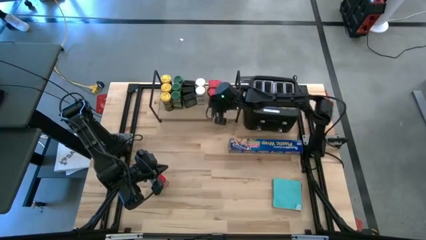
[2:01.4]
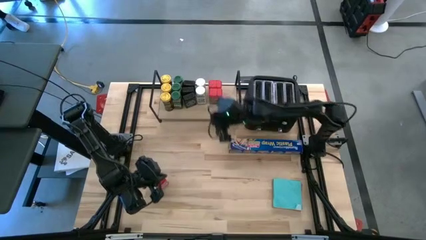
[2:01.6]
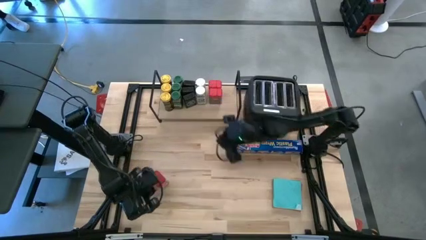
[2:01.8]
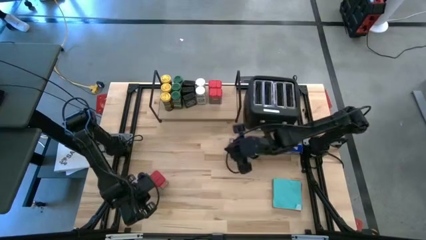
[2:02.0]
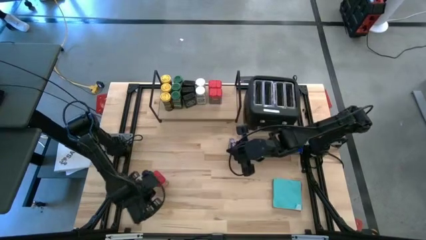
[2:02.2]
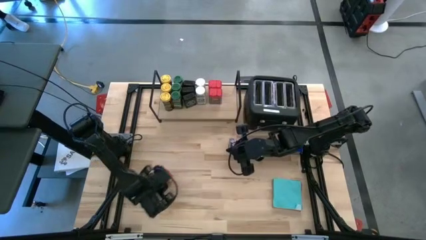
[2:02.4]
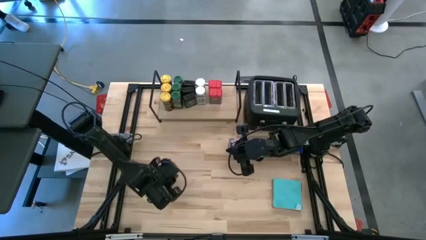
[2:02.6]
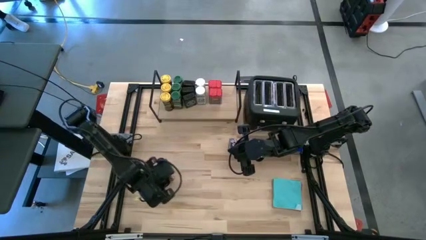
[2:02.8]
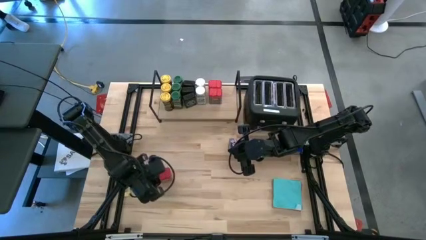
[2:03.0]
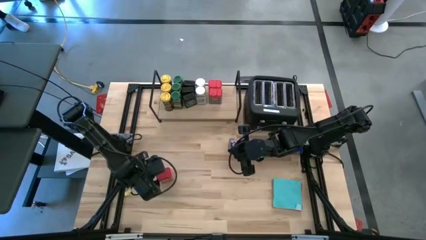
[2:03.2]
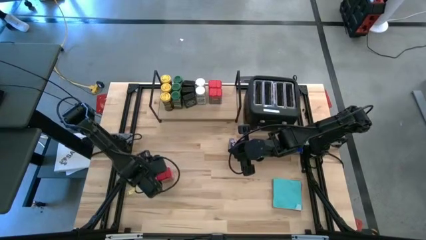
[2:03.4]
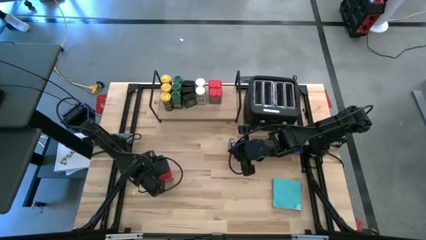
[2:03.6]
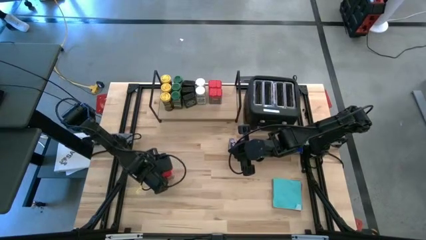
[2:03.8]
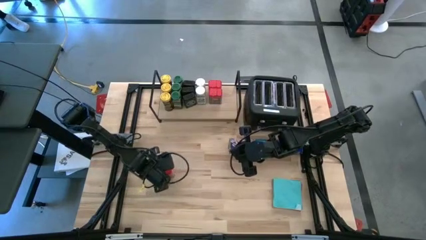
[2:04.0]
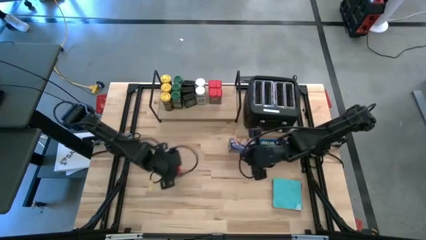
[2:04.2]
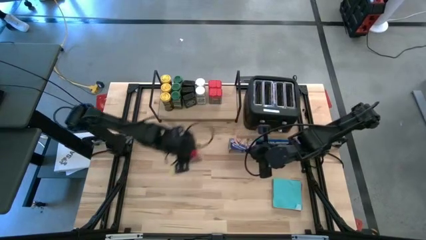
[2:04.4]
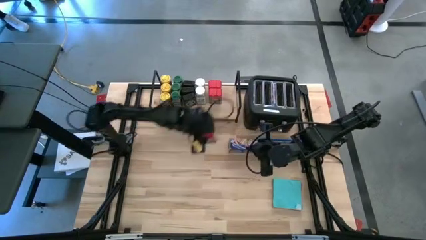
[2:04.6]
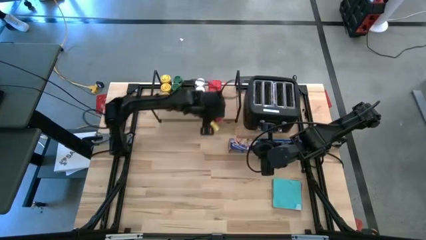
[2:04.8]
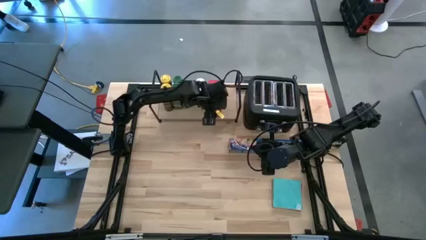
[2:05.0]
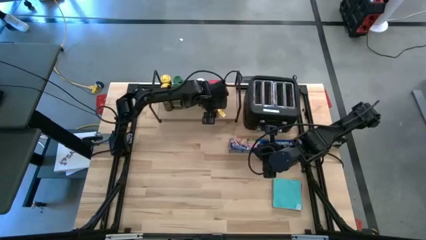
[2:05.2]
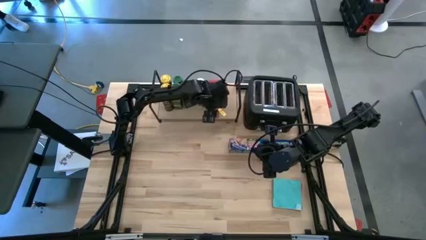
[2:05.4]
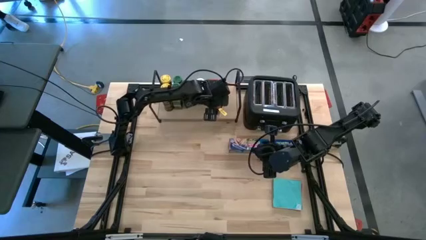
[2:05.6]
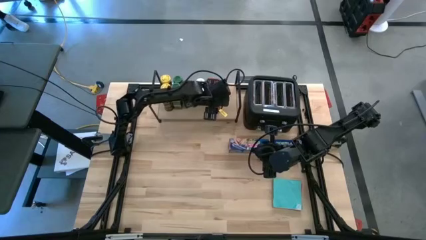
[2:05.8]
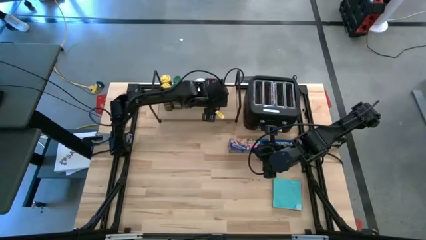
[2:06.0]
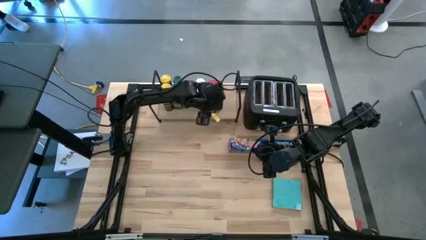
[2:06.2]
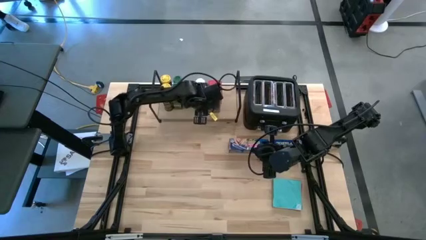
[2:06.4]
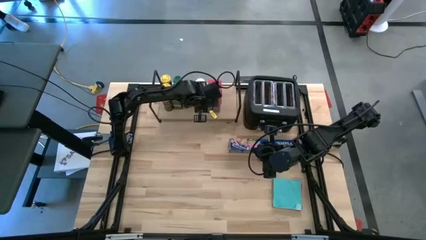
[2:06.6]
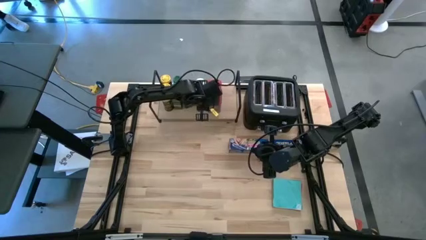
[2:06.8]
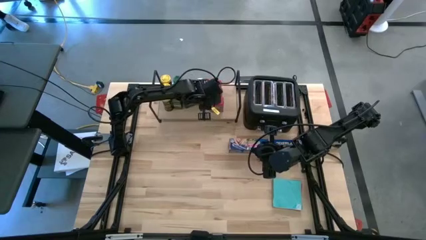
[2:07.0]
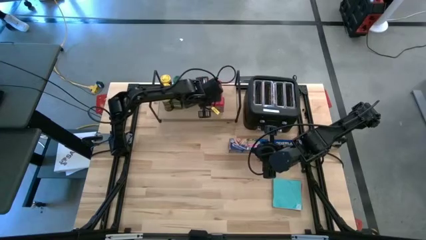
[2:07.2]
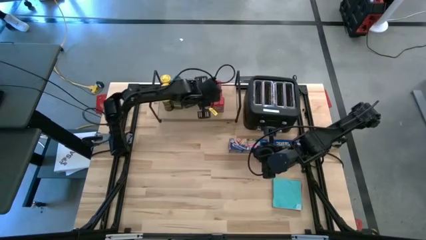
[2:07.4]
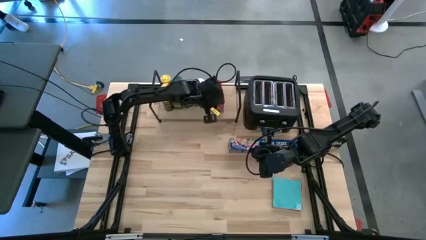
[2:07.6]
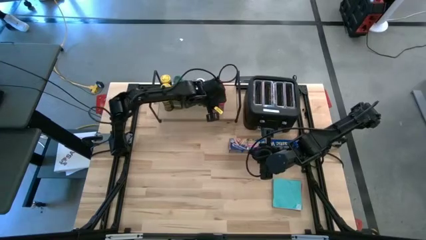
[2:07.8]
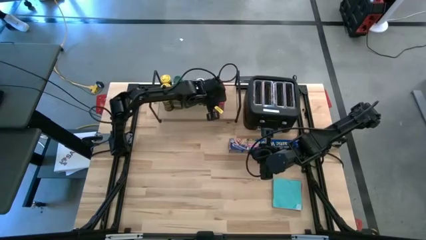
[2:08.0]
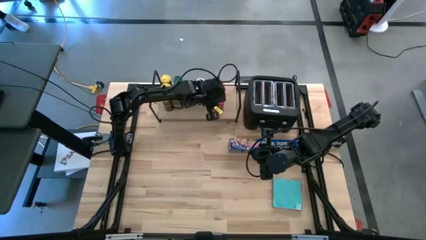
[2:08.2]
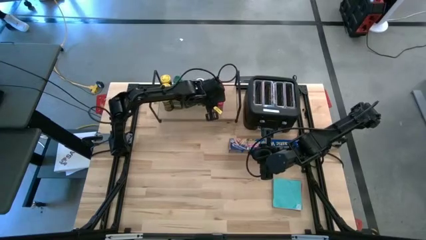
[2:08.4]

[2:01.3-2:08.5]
Task: Shelf spices
Put the red seasoning container on the shelf aligned with the other red seasoning containers

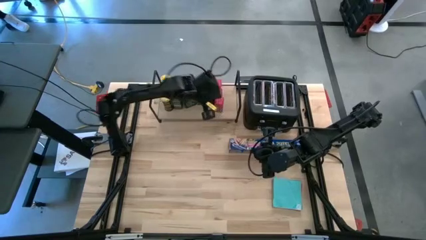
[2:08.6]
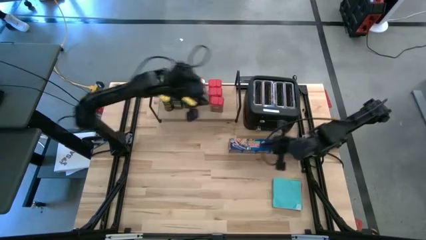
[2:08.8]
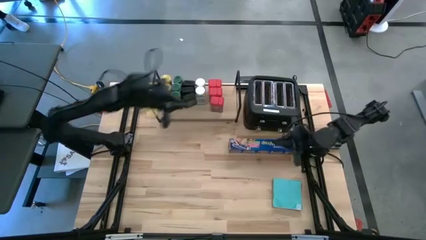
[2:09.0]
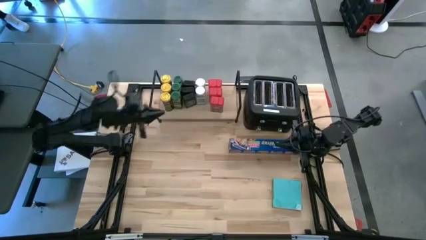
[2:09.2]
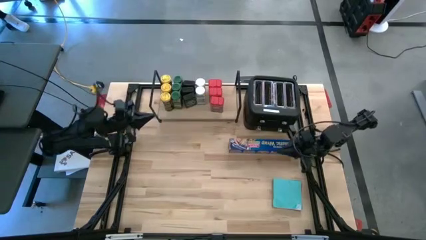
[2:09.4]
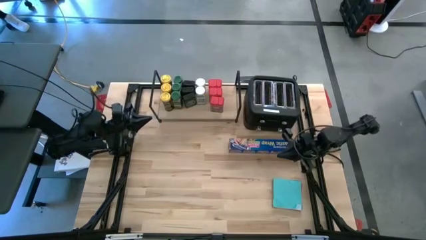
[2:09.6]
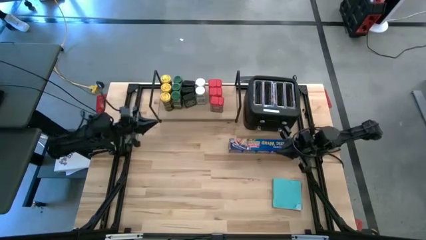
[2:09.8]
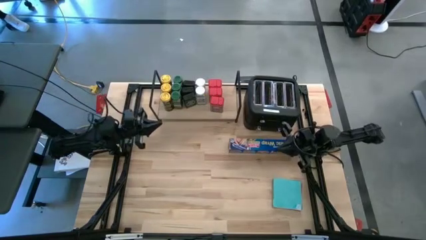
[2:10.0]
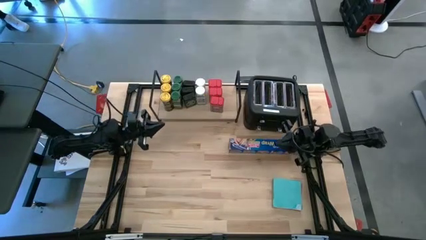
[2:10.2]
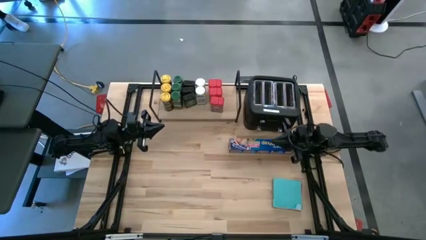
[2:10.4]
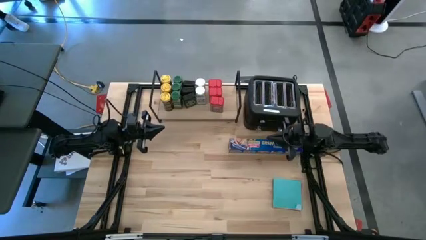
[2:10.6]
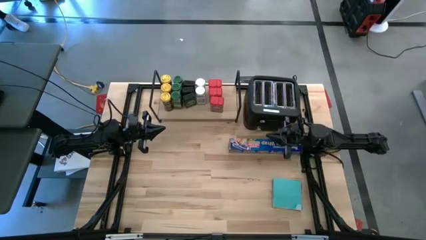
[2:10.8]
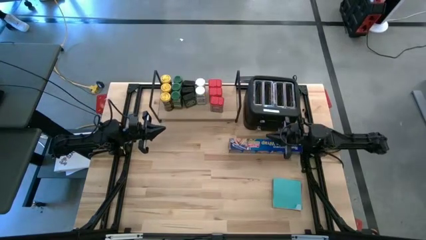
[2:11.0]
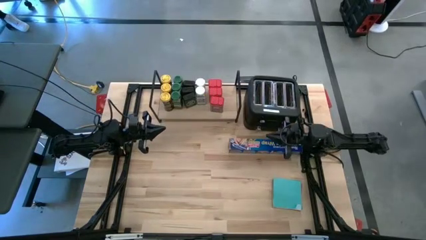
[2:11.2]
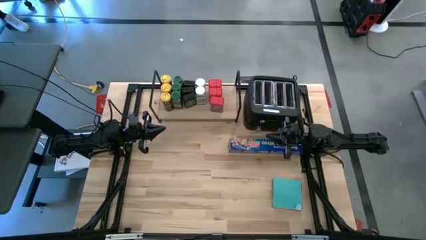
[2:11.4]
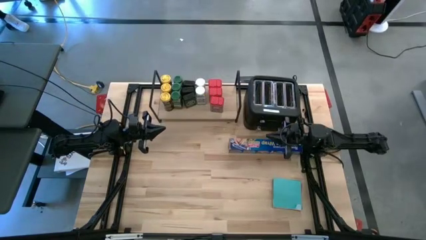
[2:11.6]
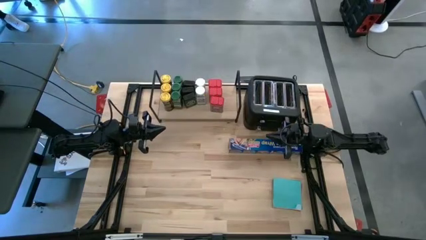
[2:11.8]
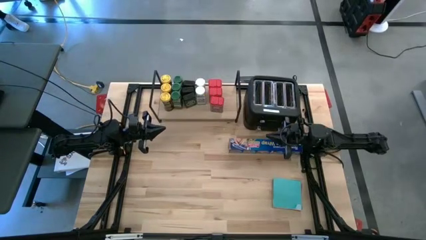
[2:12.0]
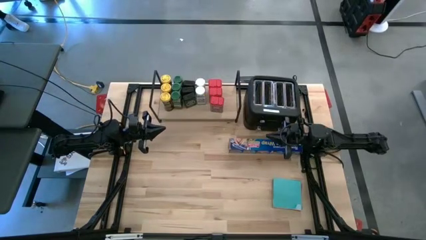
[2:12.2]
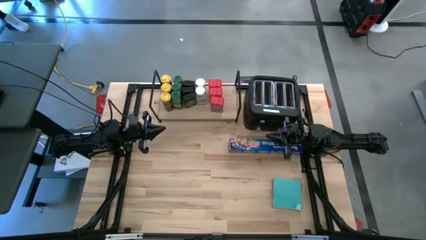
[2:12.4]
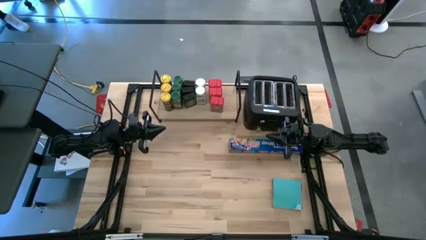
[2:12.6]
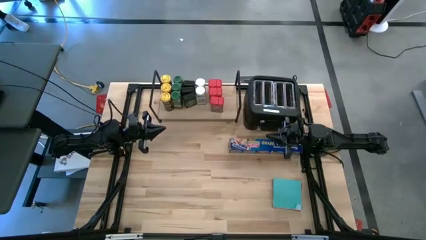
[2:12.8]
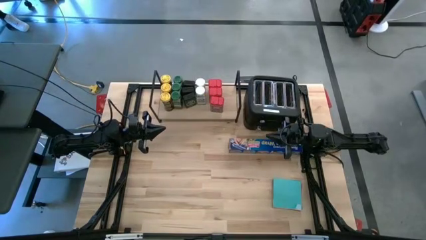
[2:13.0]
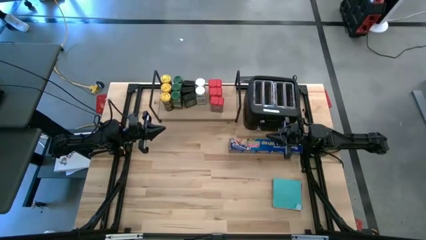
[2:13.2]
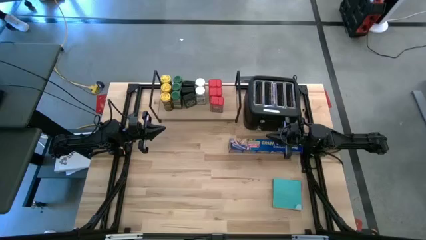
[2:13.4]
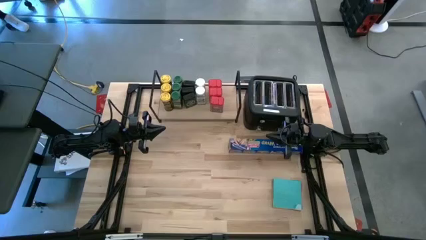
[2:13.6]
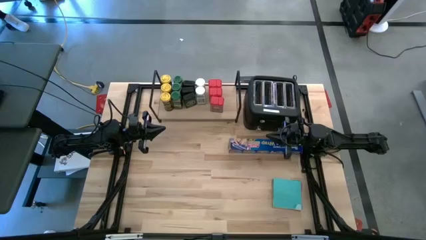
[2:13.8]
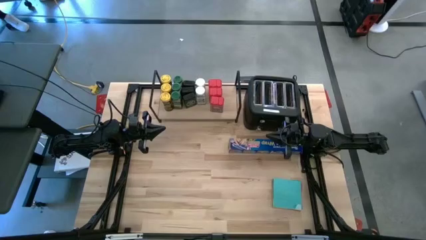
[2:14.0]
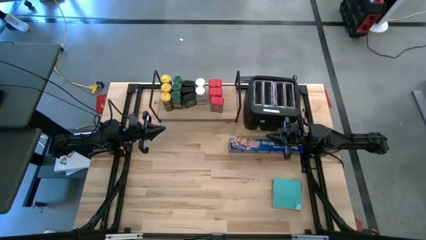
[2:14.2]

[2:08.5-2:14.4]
Return to Home Position

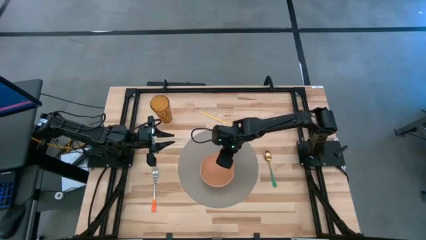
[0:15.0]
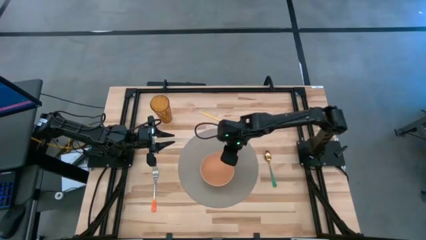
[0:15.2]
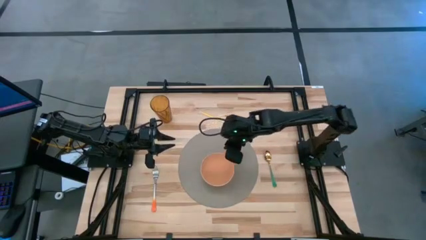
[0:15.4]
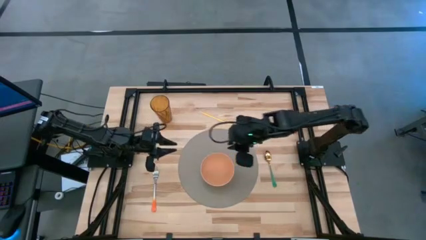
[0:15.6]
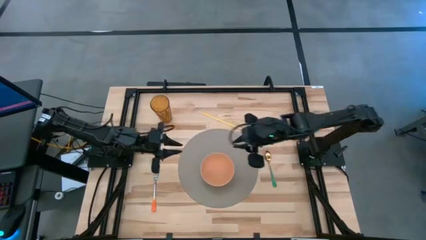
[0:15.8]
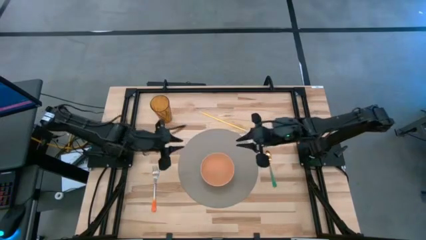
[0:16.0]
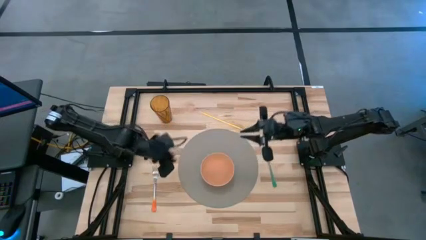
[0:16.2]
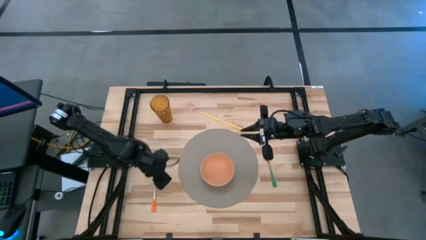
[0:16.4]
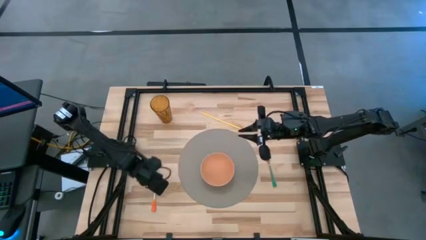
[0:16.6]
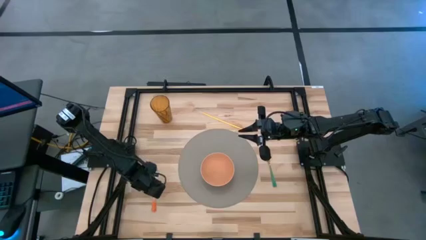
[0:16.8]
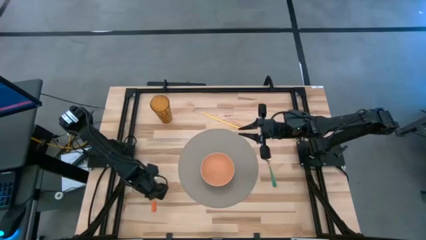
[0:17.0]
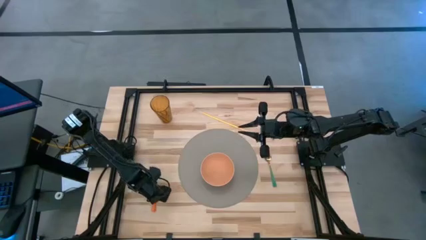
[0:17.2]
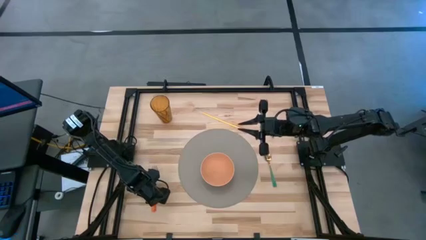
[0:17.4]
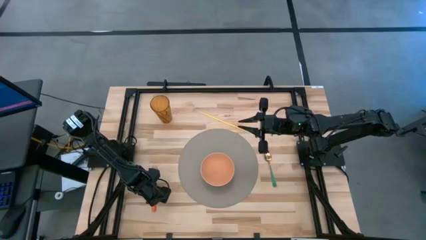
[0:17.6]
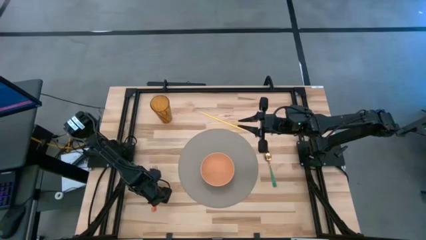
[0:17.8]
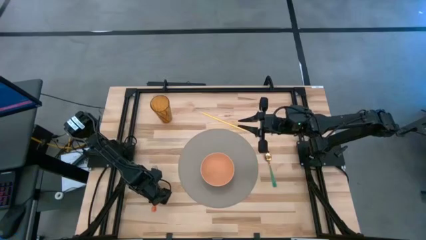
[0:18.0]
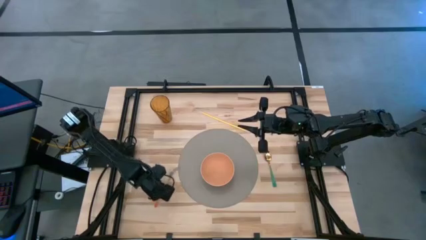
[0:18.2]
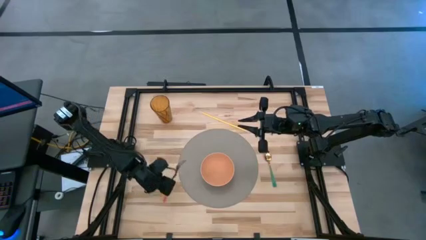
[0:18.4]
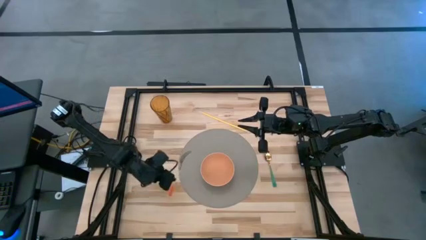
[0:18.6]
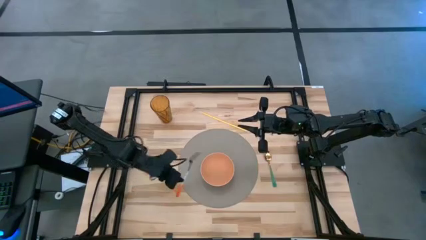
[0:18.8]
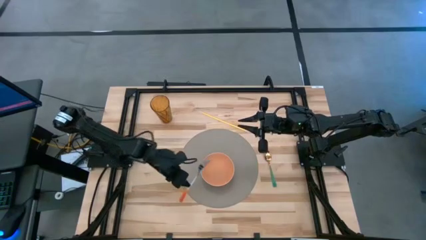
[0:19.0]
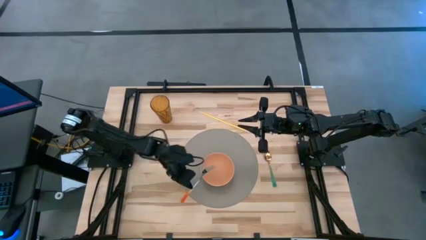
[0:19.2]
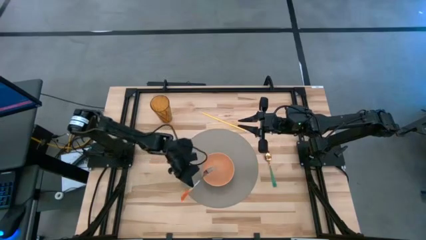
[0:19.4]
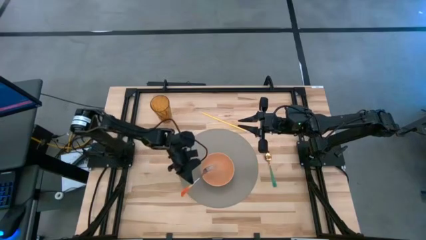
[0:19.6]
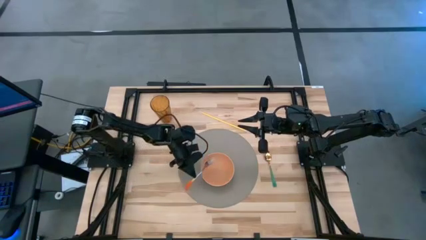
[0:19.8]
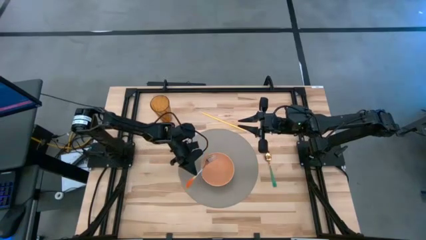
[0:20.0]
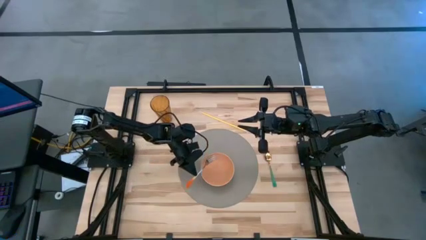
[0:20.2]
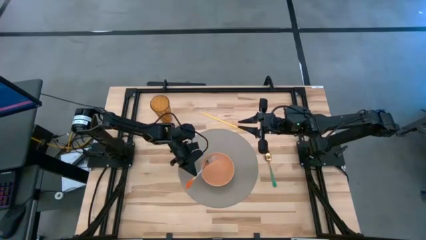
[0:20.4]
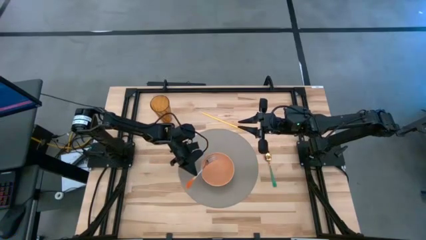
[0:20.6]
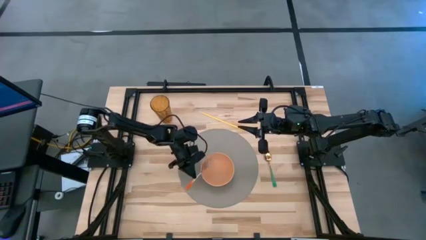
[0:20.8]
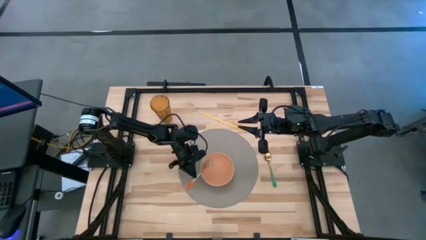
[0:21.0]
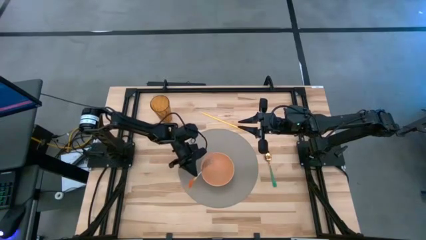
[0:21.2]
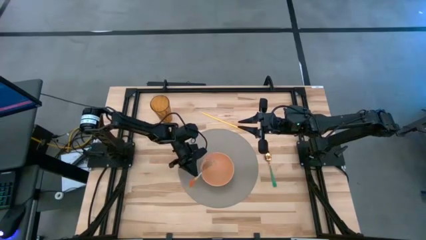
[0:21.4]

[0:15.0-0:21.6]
Task: Pick & Place Utensil
Put the orange fork into the orange bowl
